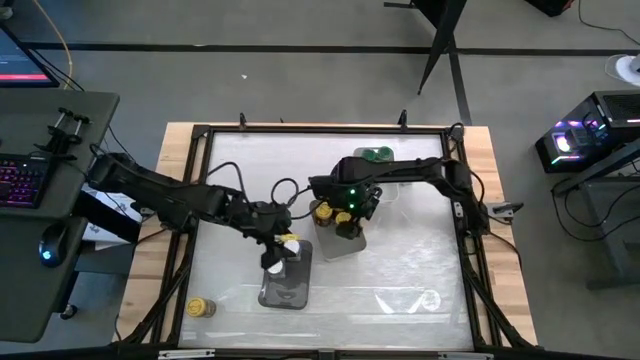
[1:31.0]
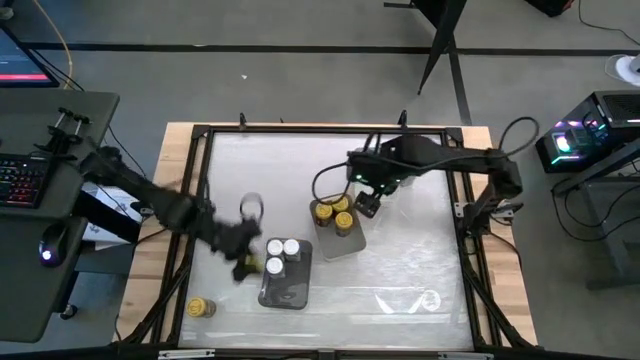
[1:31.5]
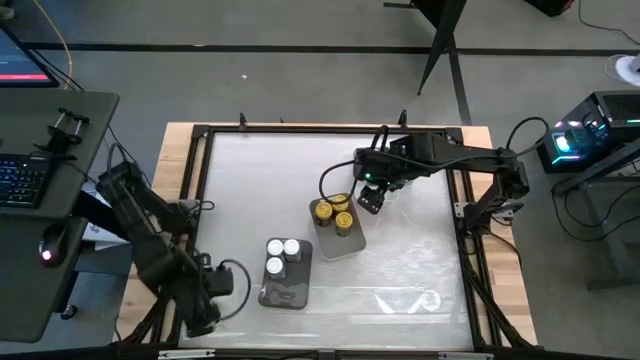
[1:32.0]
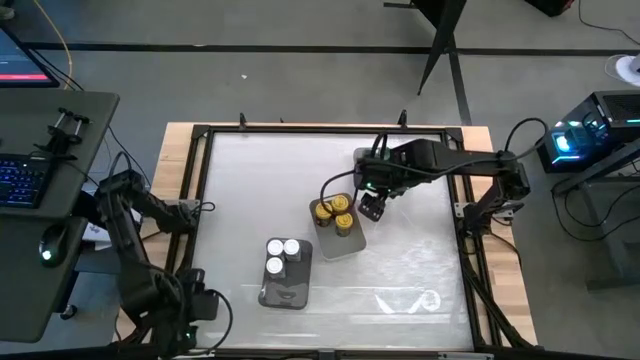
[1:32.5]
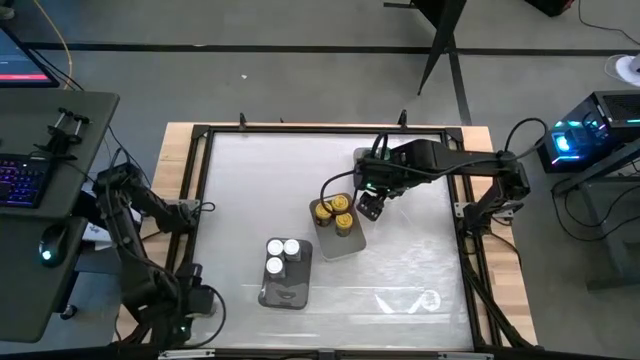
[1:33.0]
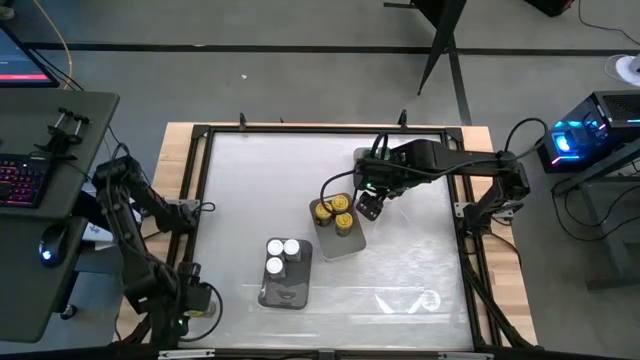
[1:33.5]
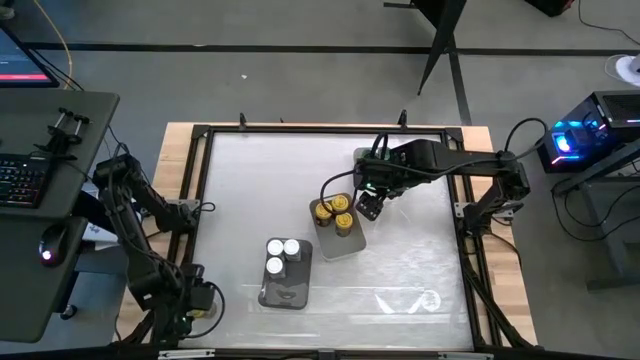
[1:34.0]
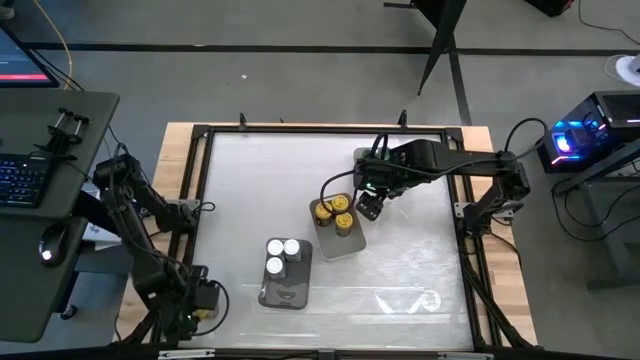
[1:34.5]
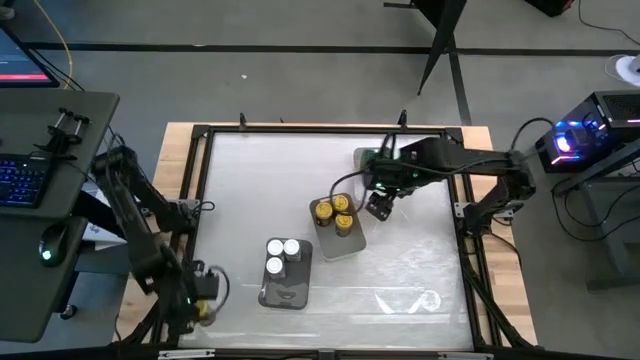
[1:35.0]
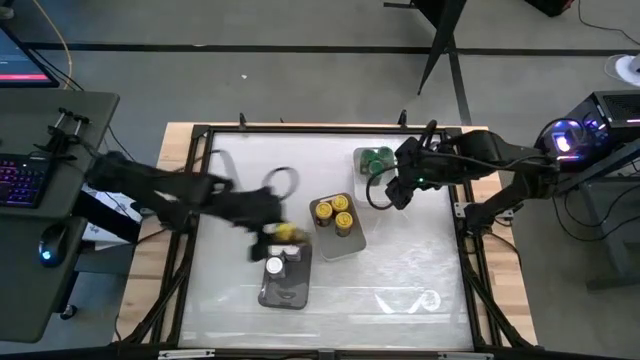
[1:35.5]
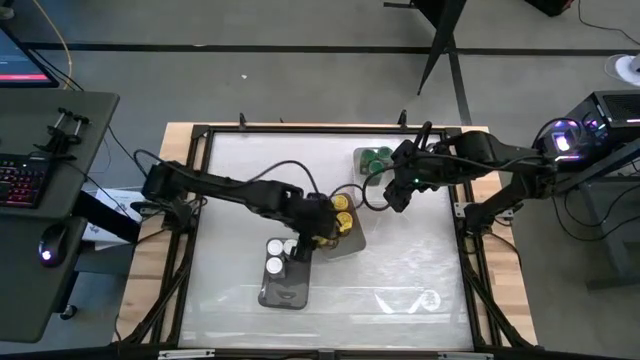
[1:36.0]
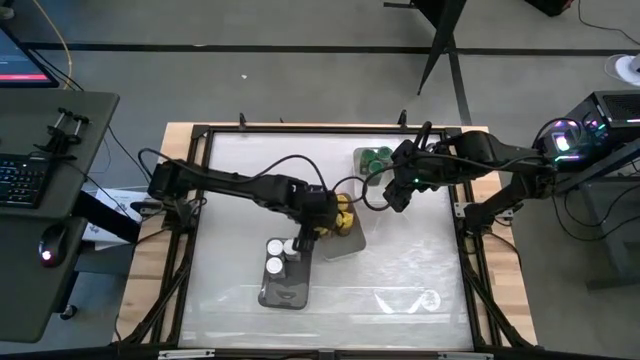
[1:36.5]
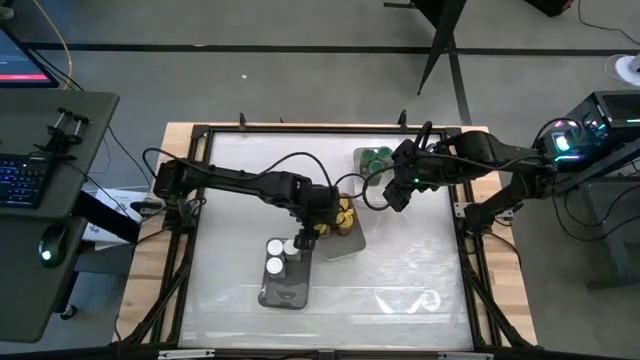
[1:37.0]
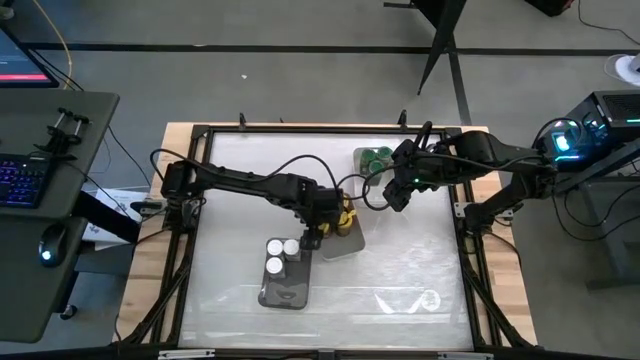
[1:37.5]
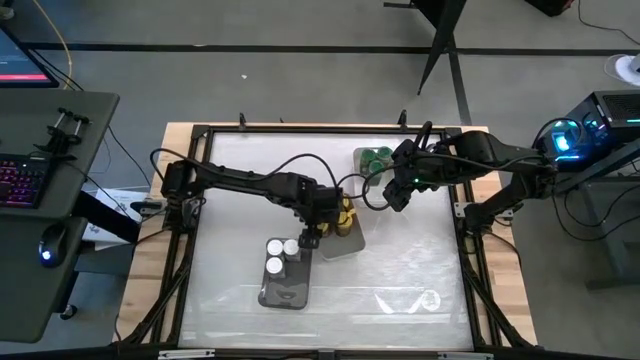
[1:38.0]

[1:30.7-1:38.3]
Task: Sort spices by type
Put the yellow seasoning bottle into the gray bin

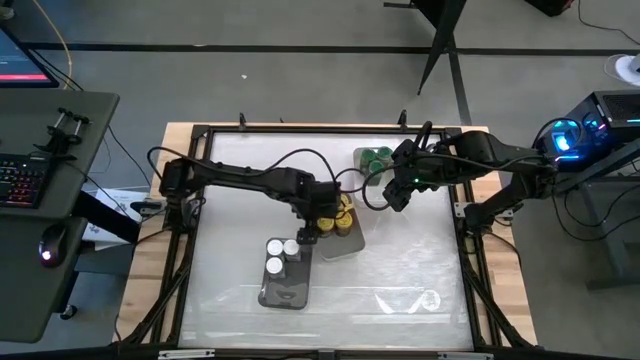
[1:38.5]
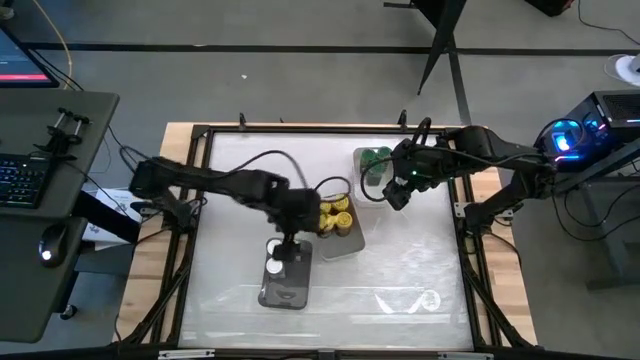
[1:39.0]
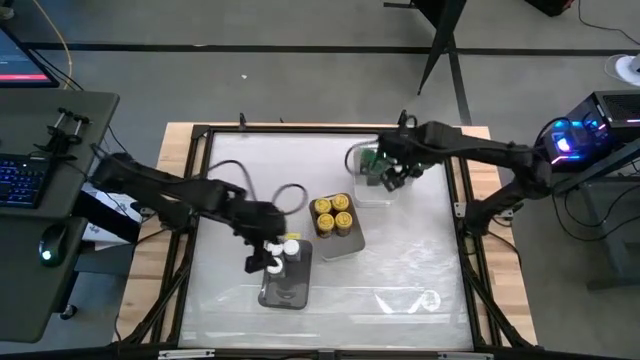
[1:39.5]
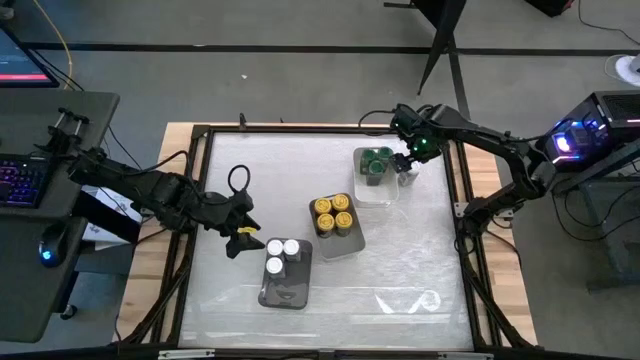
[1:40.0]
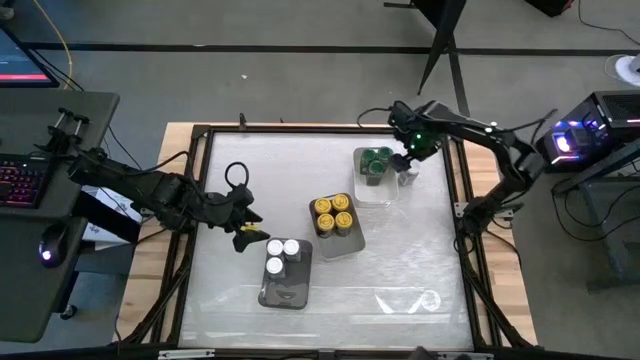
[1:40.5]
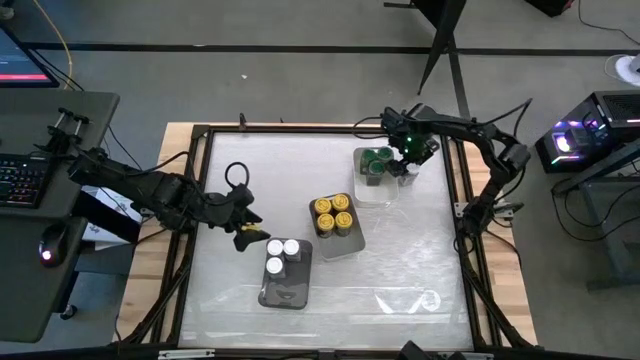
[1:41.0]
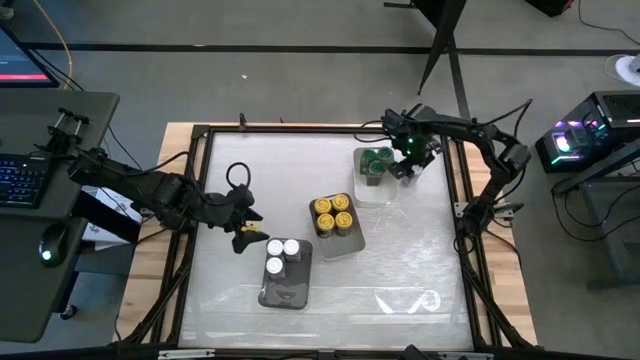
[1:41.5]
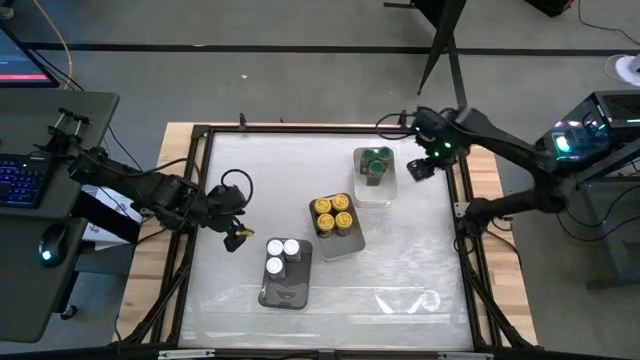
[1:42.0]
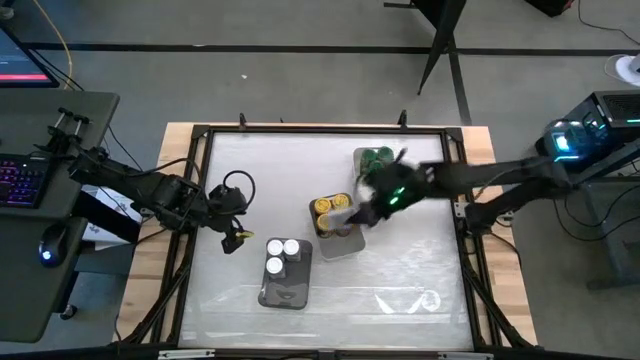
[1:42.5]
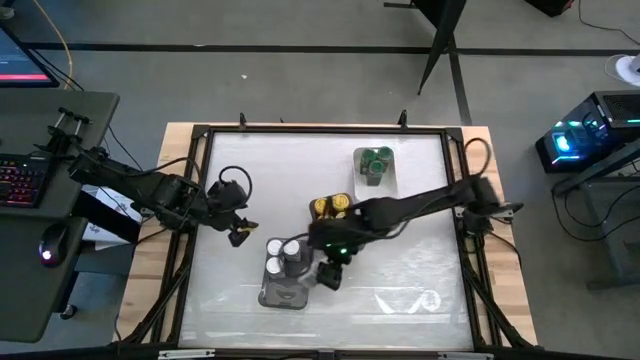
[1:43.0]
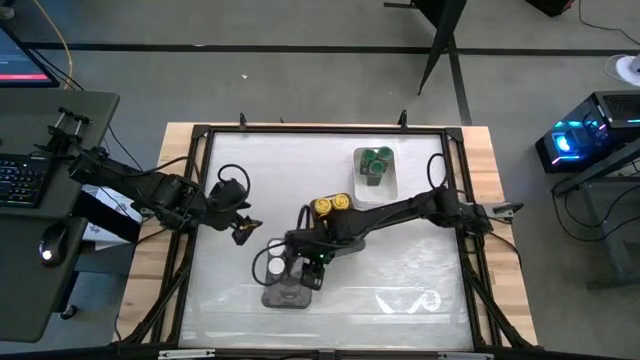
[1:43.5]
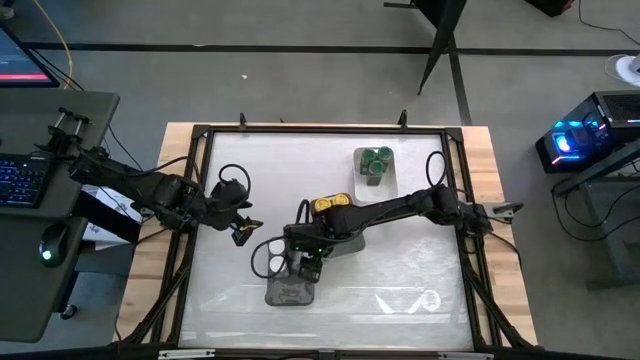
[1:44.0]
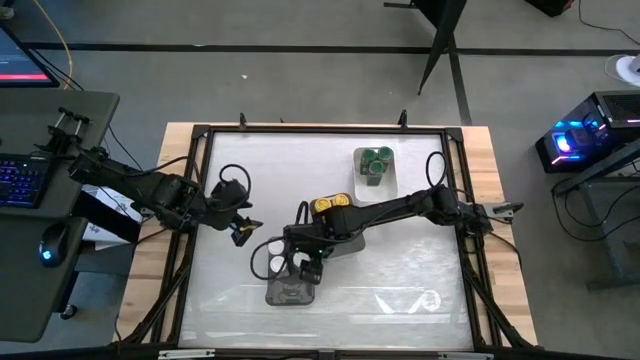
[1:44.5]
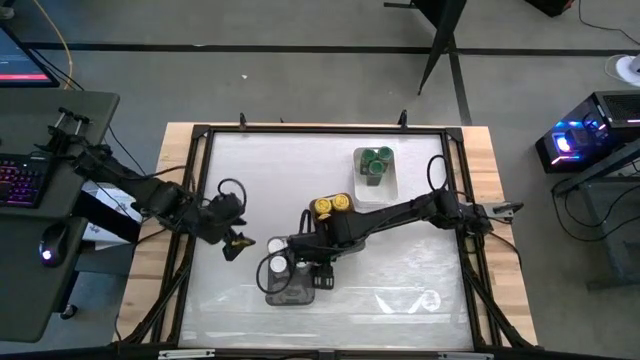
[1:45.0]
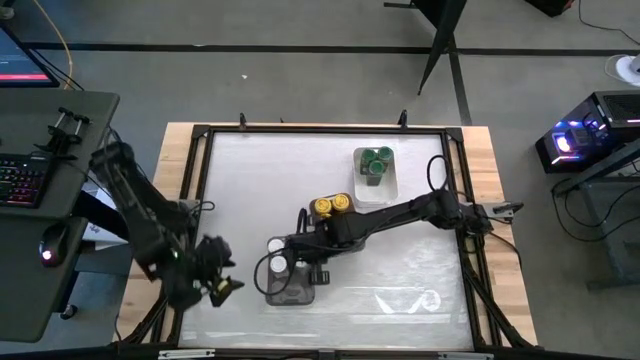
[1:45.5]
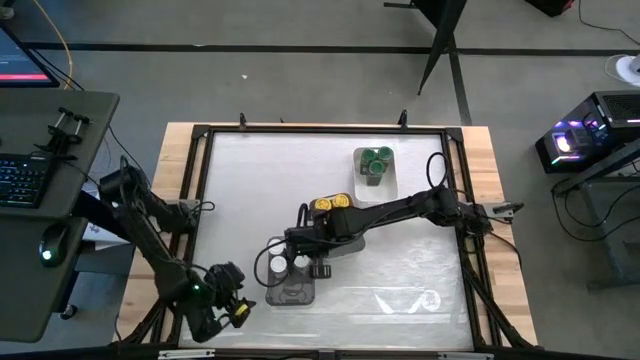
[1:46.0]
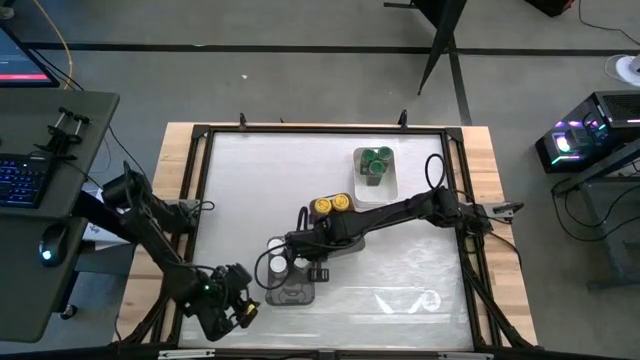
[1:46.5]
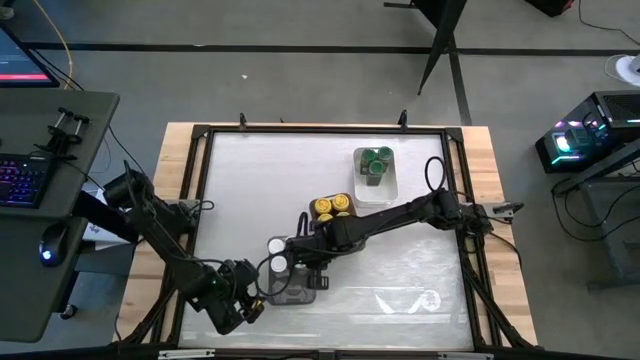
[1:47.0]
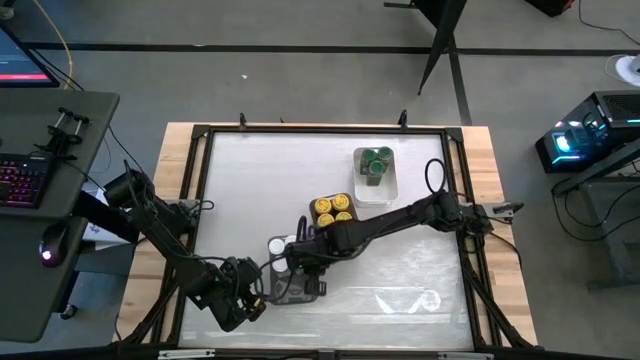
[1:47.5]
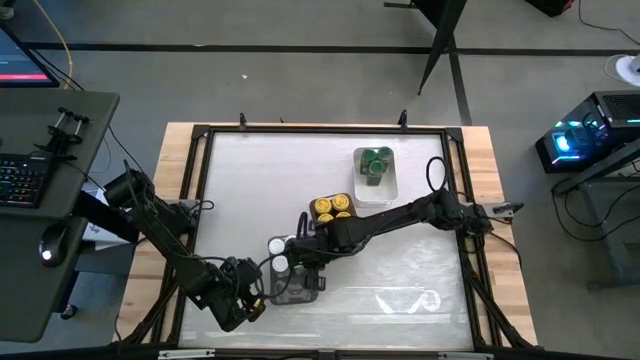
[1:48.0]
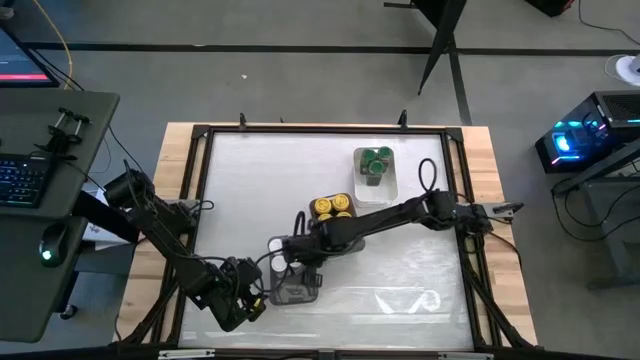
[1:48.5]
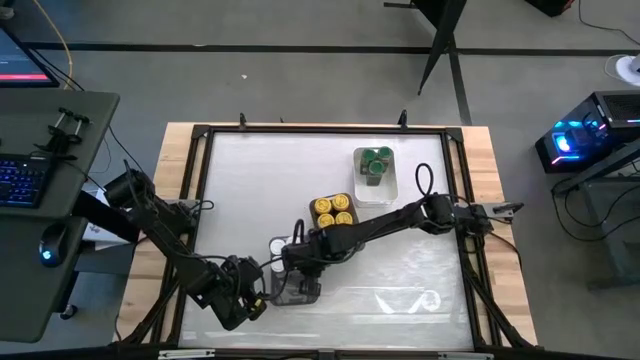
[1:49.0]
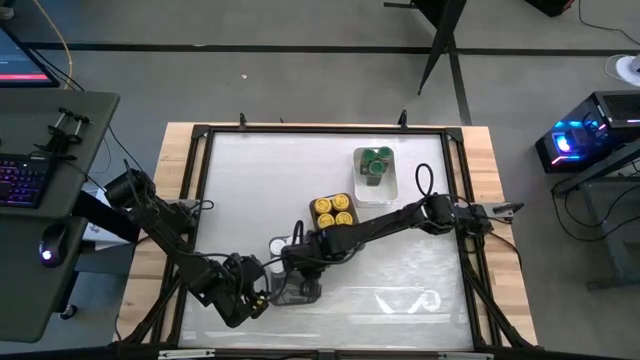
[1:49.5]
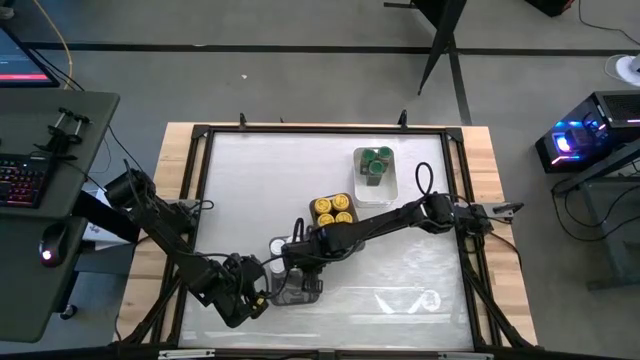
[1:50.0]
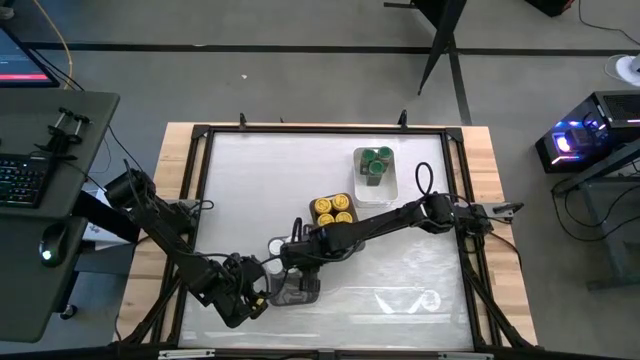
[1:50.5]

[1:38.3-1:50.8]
Put the white seasoning bottle into the black bin

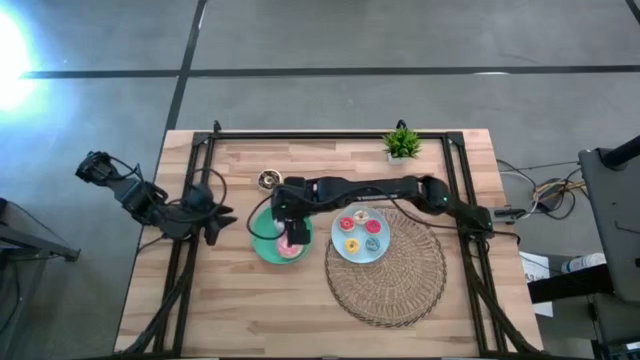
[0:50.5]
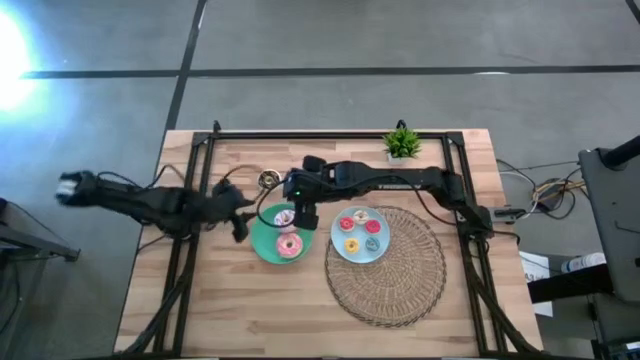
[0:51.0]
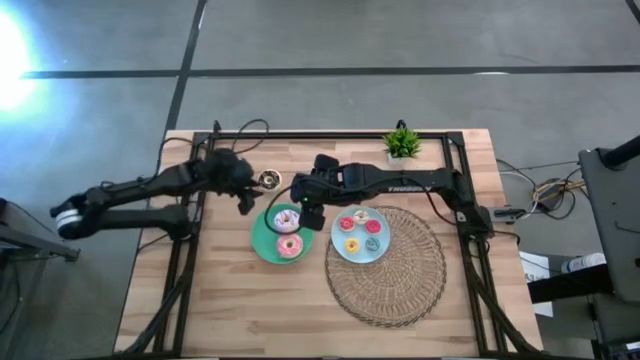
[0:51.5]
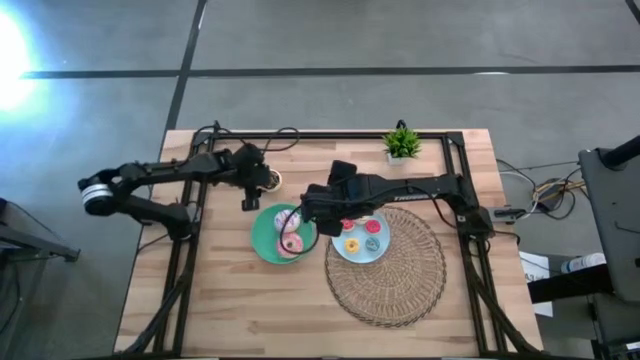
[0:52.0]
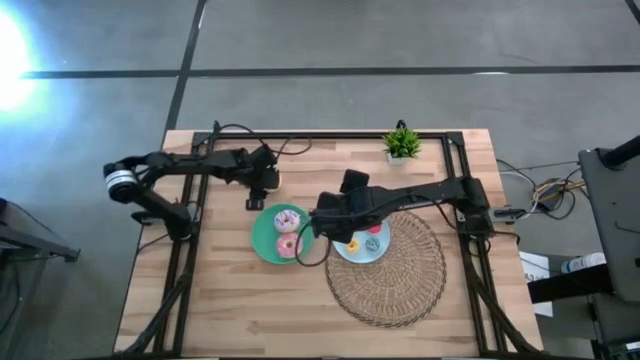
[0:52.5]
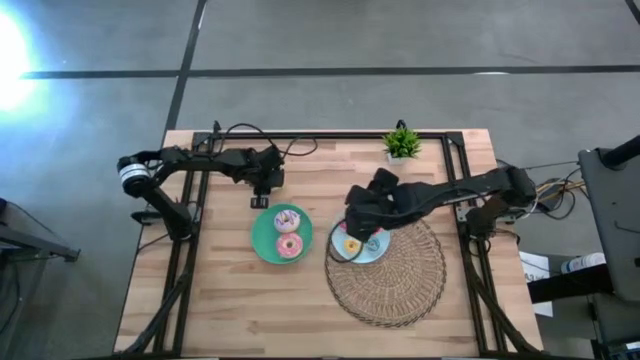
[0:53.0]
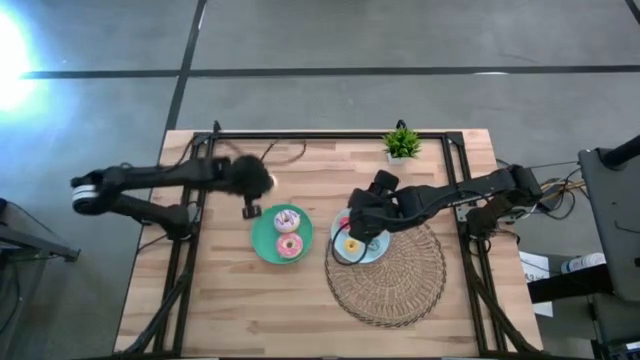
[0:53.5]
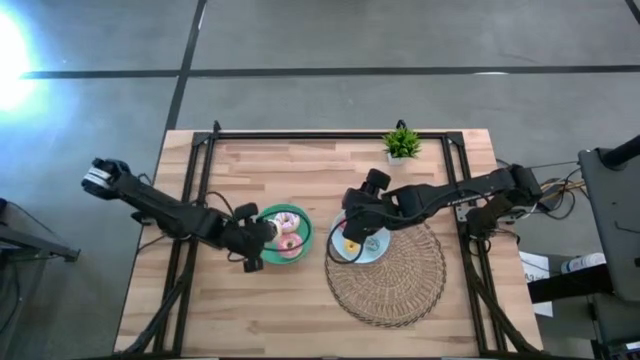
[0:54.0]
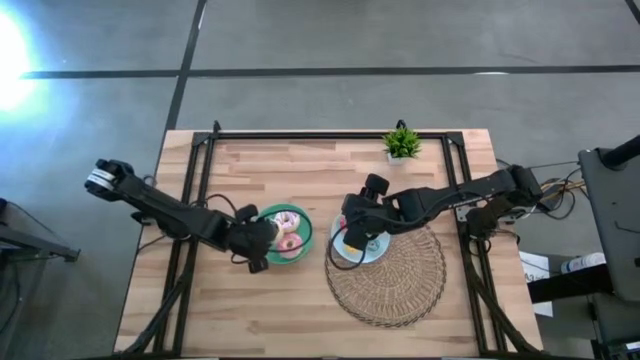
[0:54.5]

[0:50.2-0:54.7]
Task: Pick & Place donuts
Put the large black donut on the green plate
